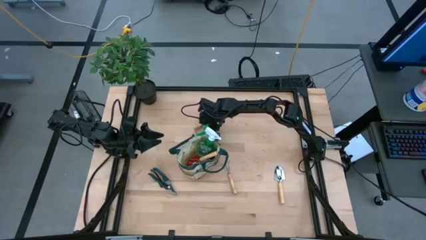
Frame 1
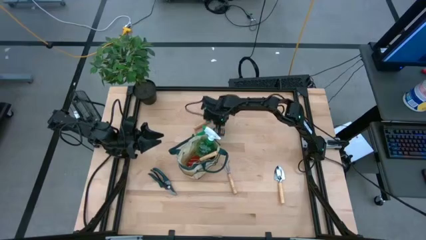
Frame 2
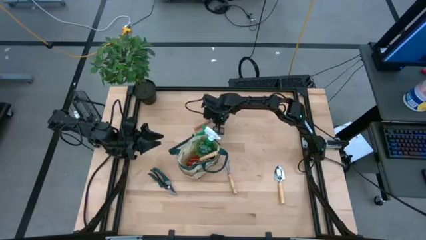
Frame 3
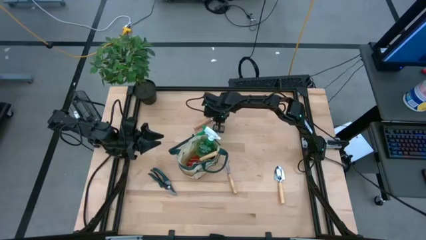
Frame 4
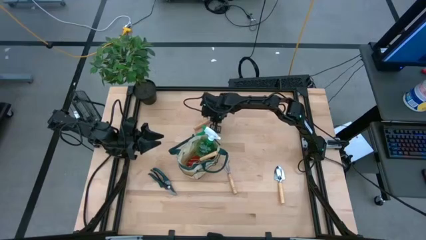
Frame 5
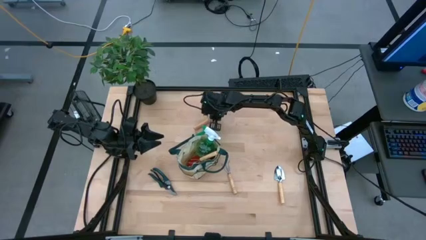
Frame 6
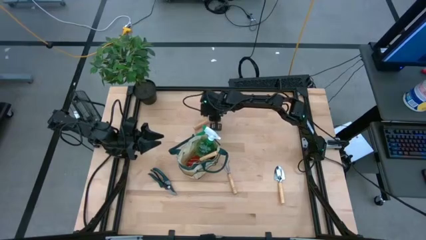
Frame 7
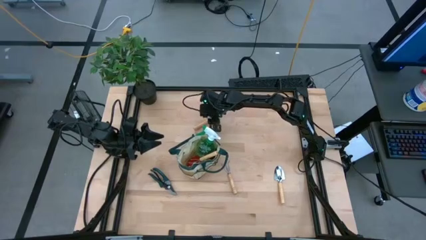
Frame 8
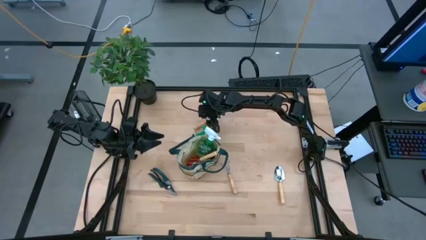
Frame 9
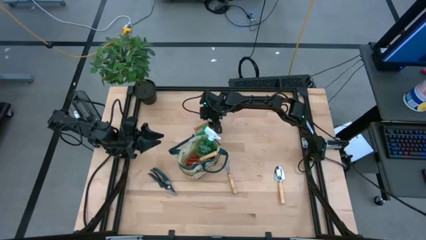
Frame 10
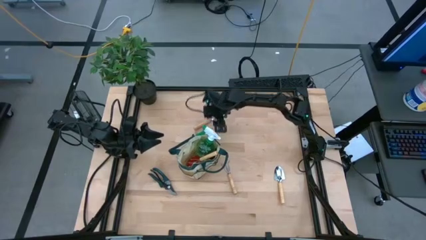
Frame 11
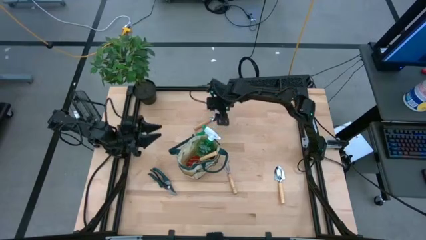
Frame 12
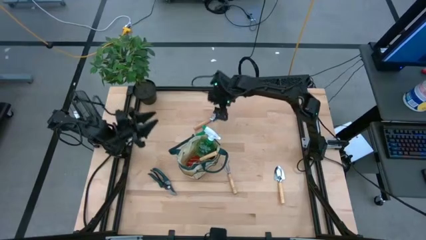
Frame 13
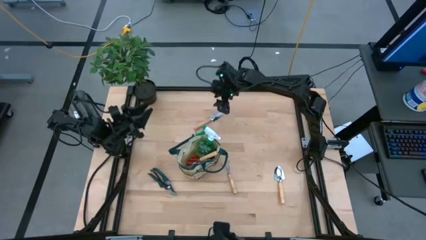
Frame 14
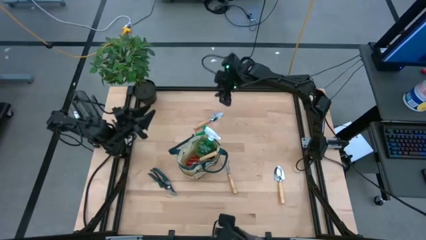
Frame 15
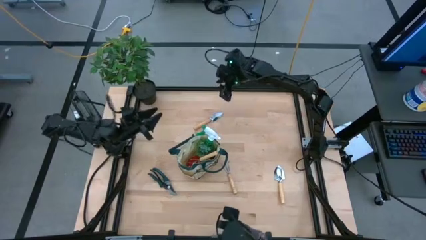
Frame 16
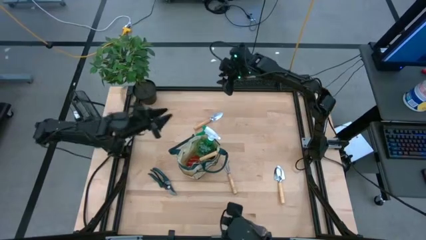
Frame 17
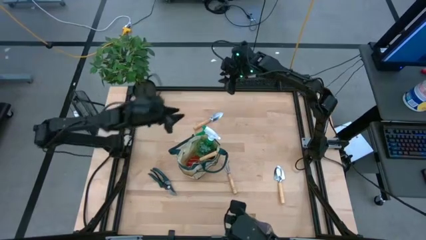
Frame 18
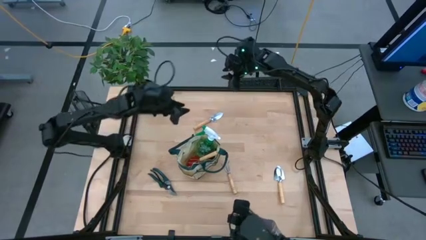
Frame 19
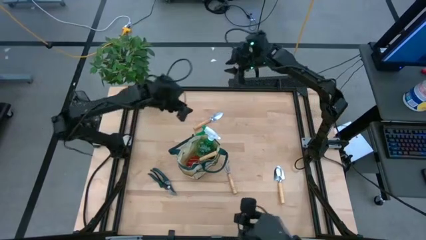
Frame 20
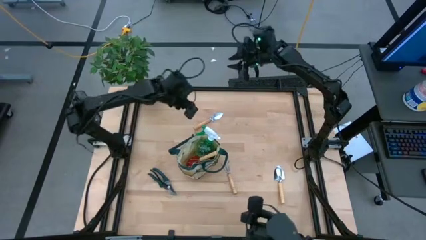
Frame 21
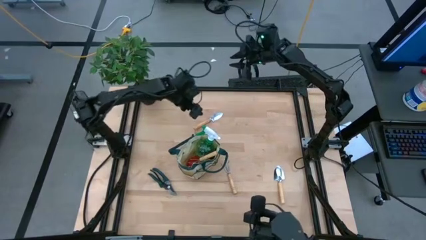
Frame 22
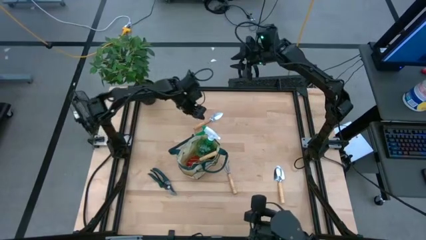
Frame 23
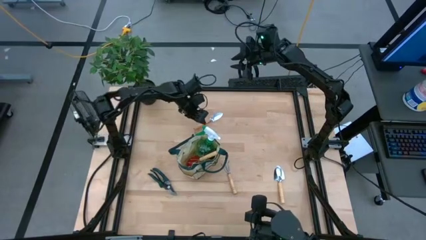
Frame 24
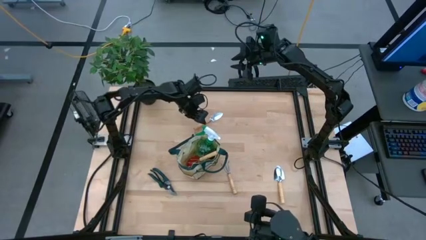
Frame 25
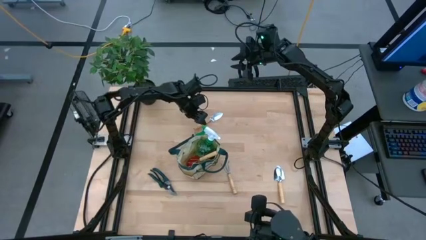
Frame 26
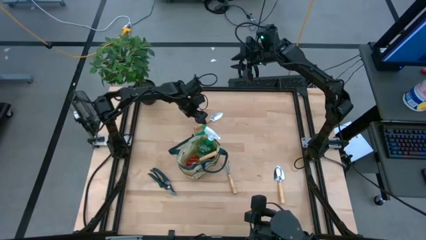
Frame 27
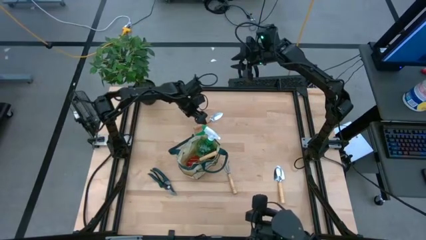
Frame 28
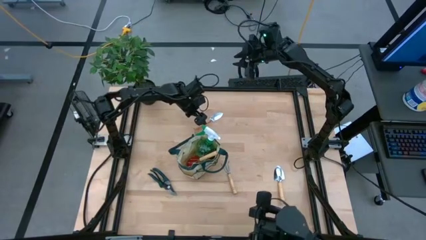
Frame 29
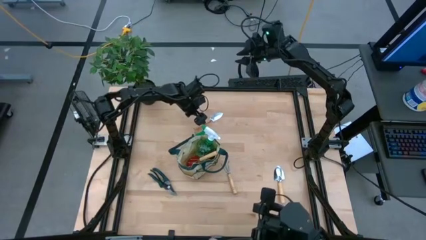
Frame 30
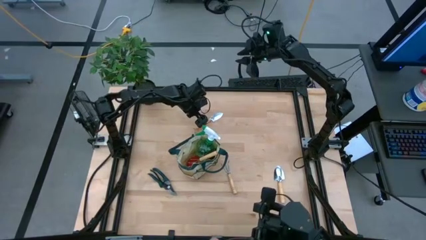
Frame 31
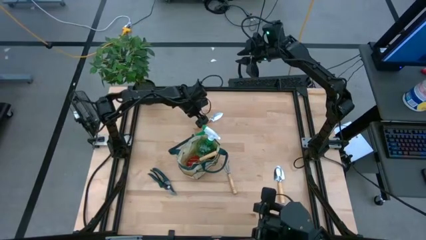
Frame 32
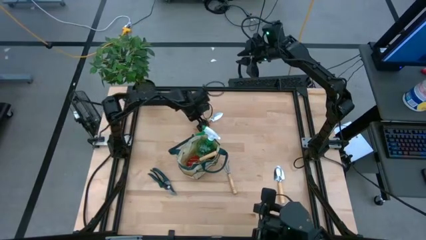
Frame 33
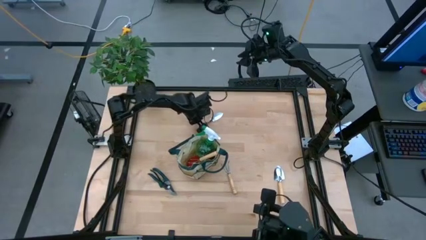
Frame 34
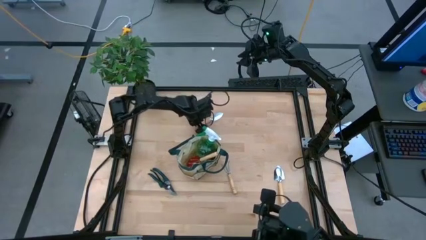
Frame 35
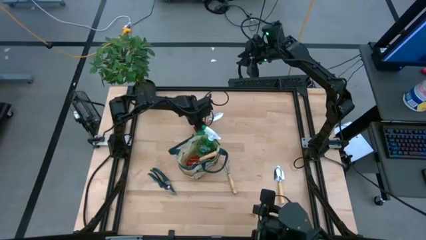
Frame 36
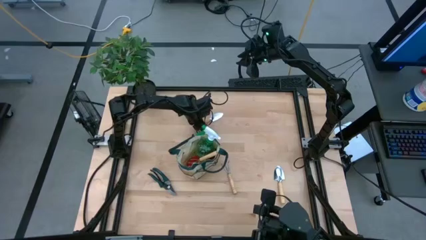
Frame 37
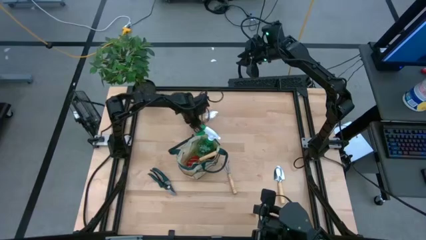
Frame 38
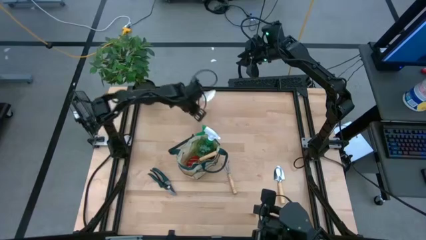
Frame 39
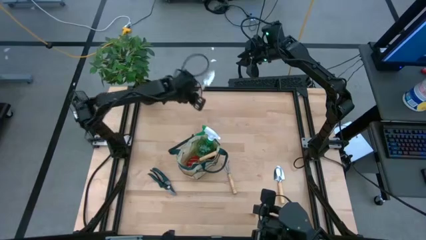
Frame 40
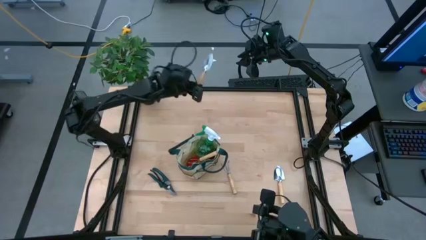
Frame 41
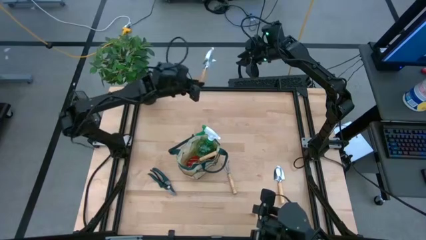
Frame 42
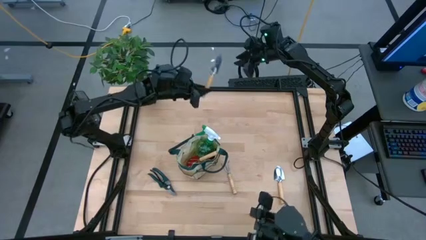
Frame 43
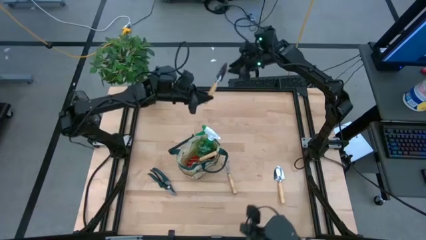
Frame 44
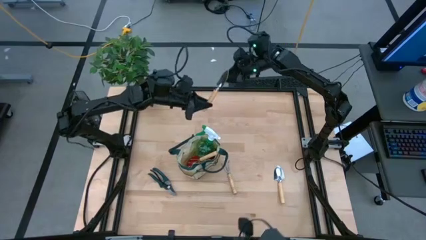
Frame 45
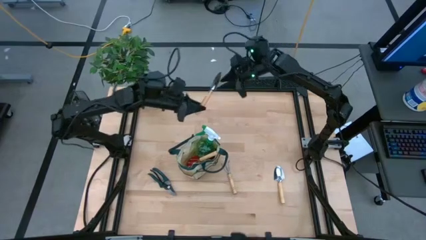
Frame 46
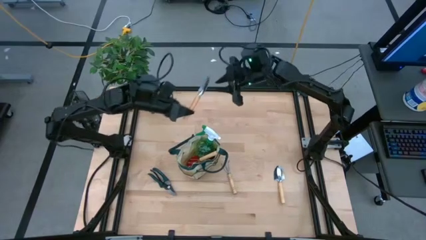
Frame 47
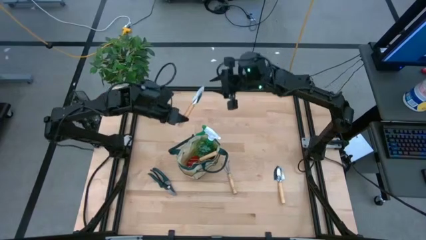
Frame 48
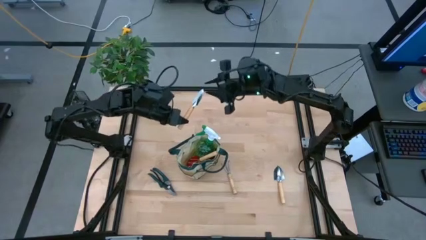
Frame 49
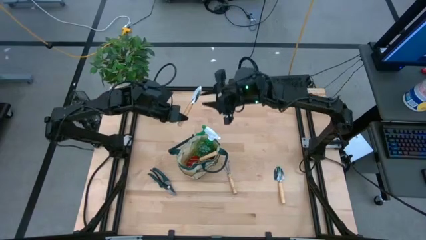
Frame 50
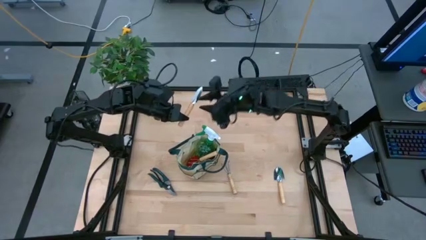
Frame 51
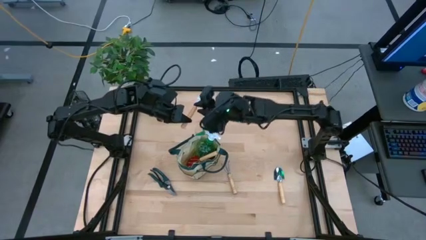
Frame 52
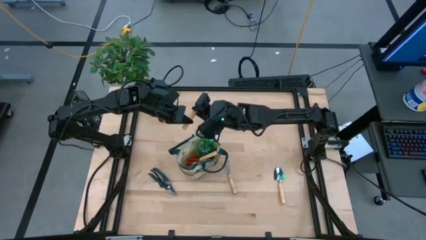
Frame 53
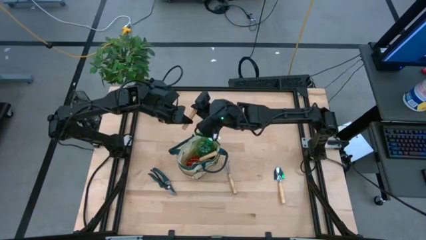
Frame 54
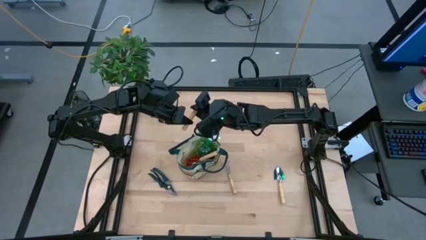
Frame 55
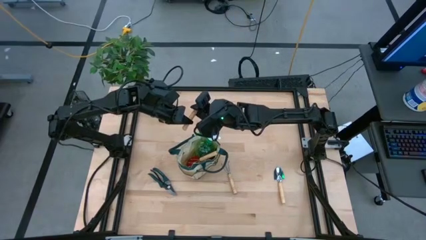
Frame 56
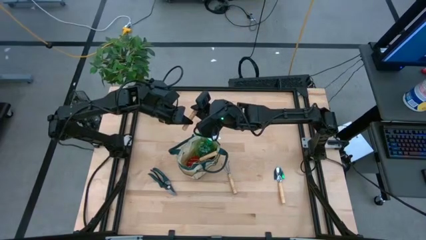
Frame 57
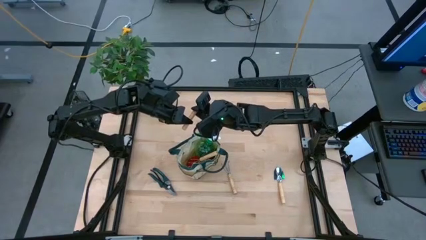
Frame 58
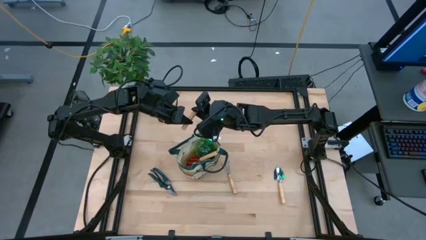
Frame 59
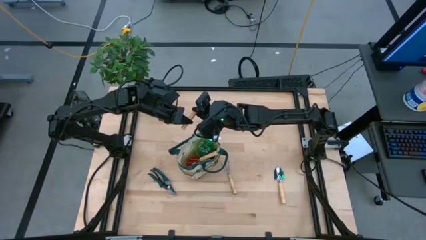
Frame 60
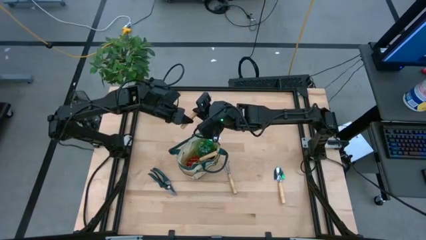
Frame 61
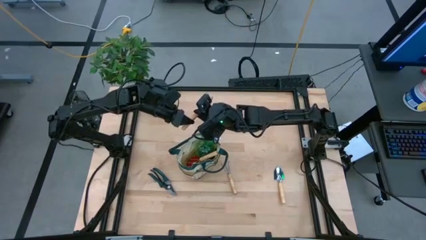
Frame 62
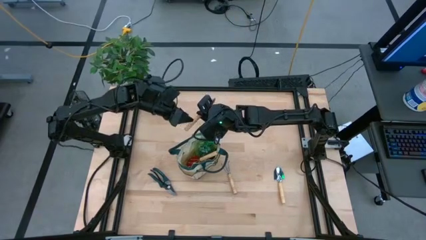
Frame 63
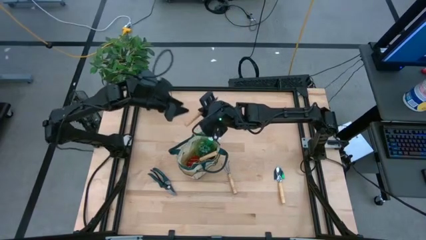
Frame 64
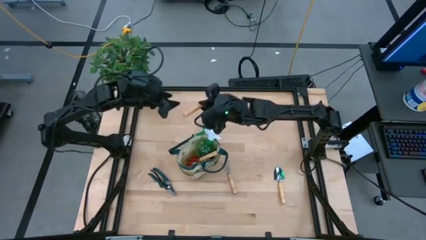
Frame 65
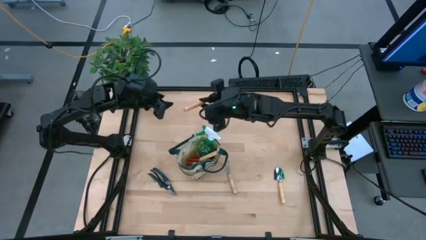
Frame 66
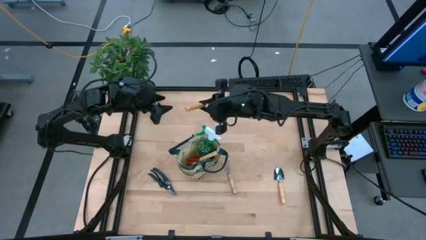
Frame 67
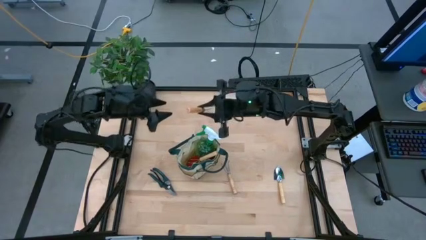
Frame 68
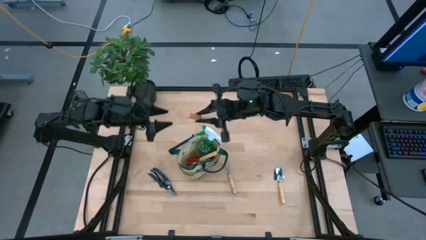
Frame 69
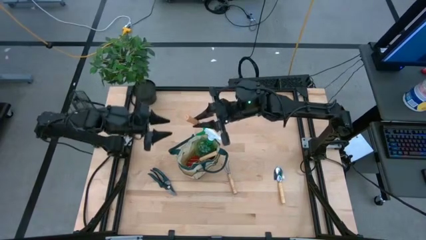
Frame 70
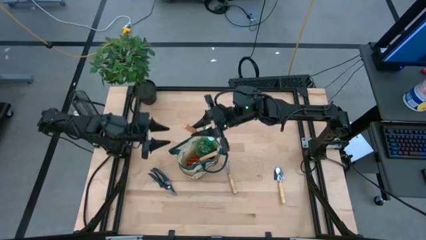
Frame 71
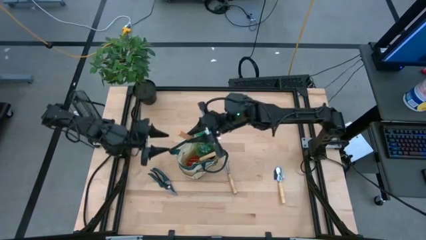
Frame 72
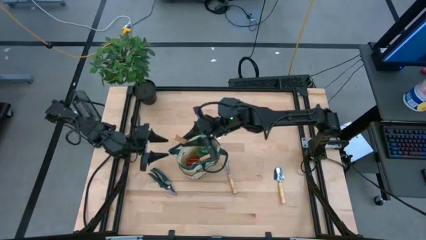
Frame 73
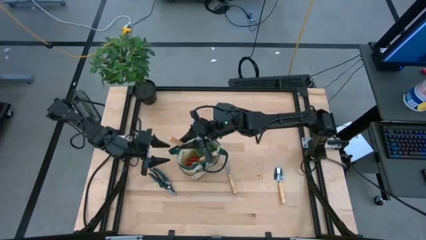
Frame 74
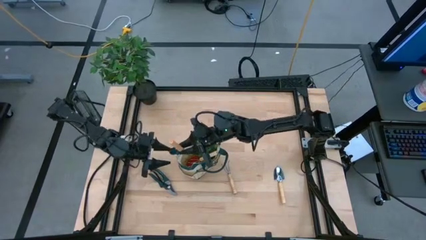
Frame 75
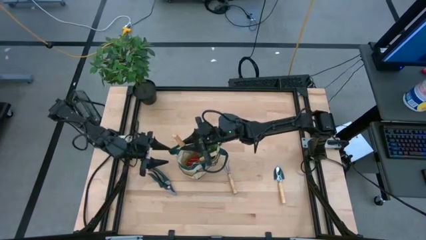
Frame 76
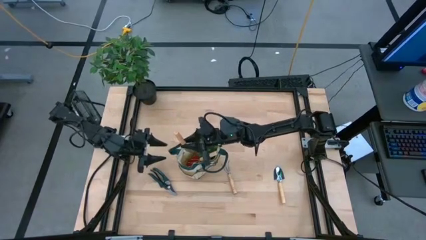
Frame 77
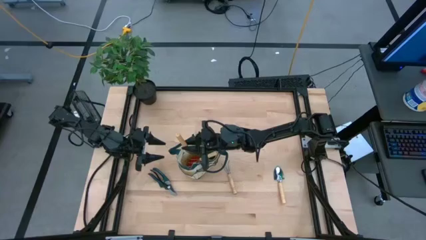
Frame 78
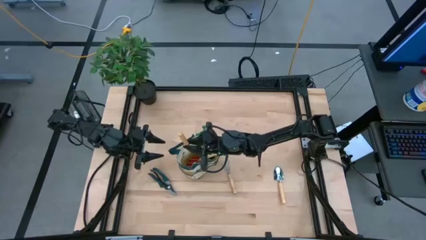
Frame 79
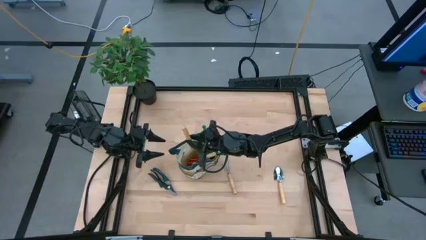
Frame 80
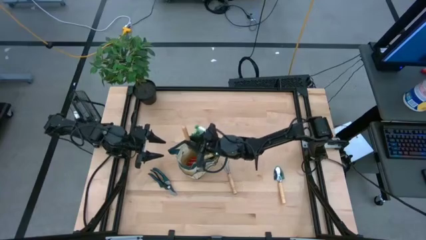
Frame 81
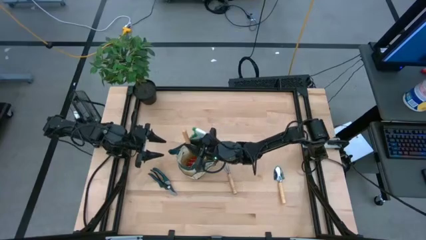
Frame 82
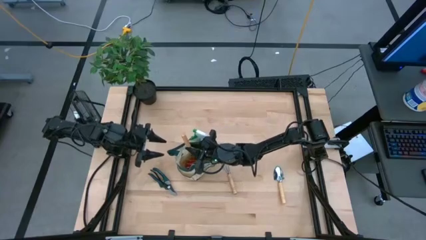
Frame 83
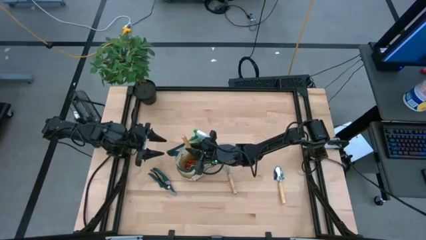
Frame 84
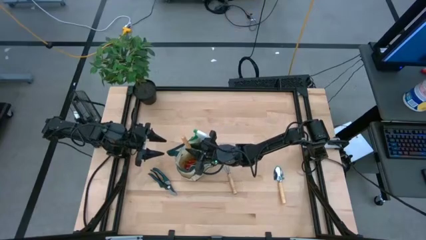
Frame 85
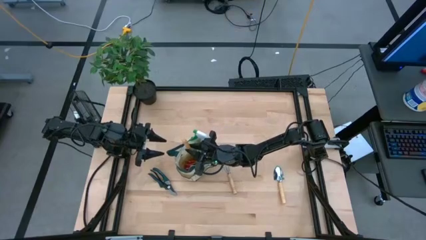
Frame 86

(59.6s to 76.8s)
Task: Pick & Place Garden tools in Gardening bag
Put the brown trowel into the brown bag
